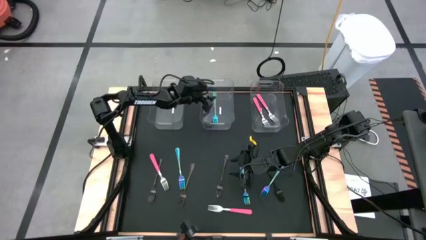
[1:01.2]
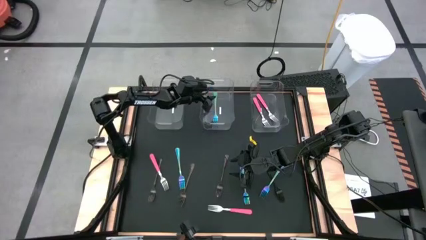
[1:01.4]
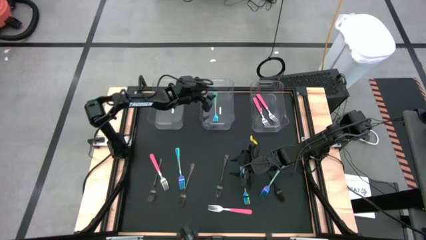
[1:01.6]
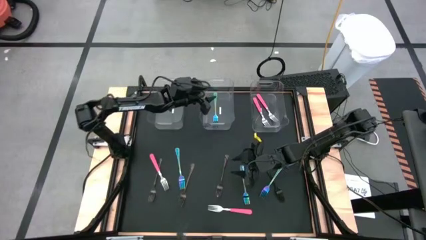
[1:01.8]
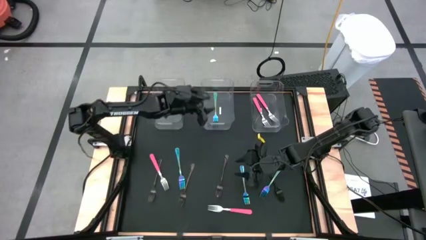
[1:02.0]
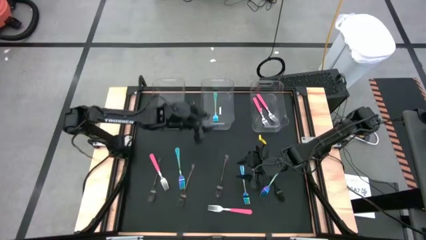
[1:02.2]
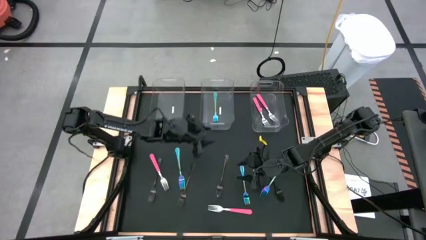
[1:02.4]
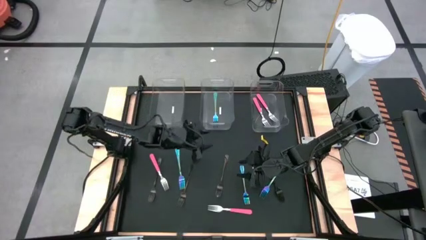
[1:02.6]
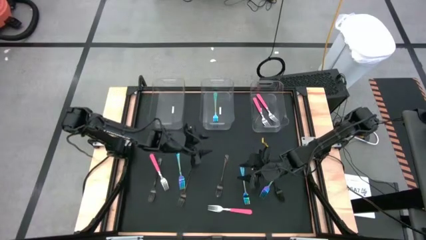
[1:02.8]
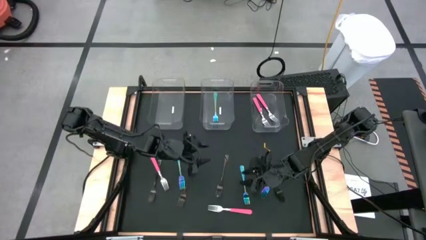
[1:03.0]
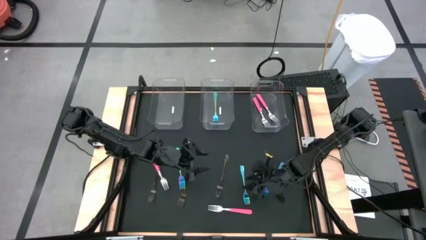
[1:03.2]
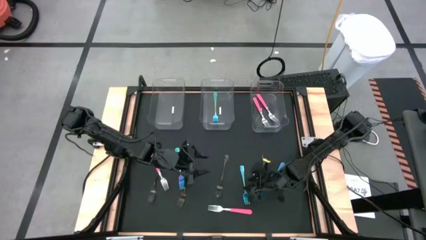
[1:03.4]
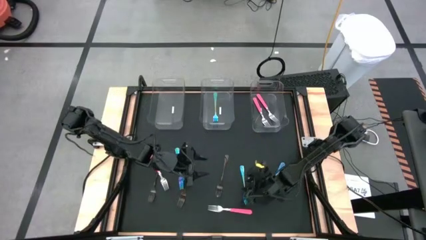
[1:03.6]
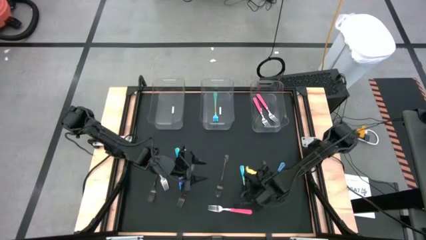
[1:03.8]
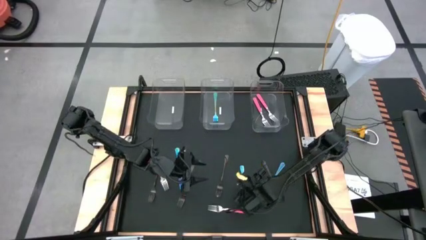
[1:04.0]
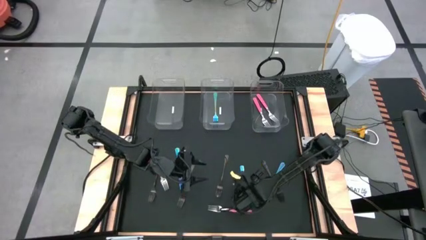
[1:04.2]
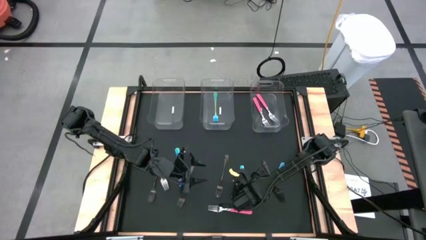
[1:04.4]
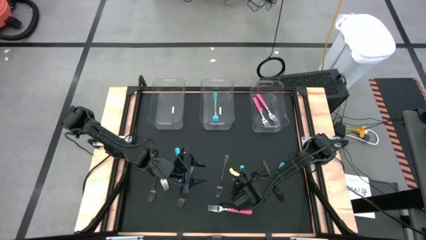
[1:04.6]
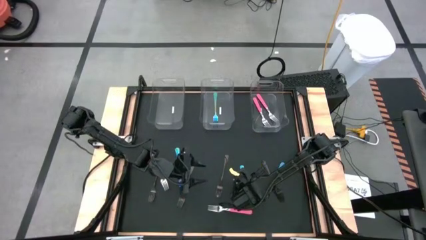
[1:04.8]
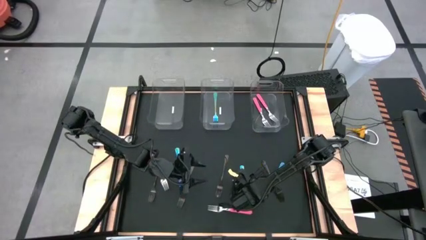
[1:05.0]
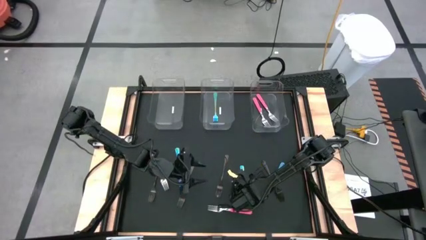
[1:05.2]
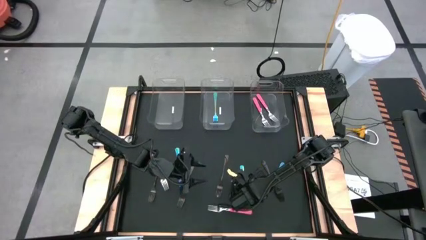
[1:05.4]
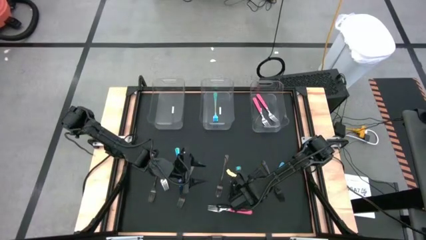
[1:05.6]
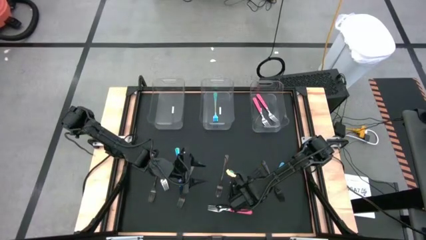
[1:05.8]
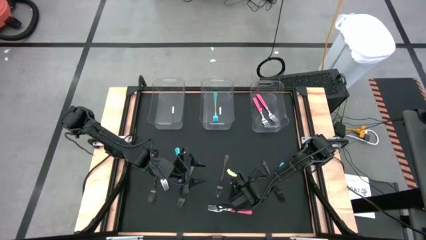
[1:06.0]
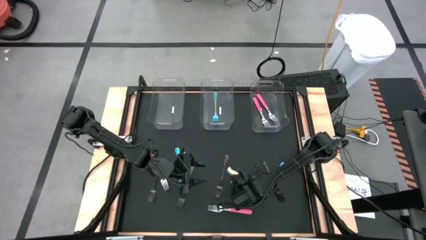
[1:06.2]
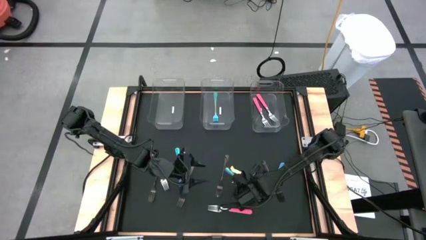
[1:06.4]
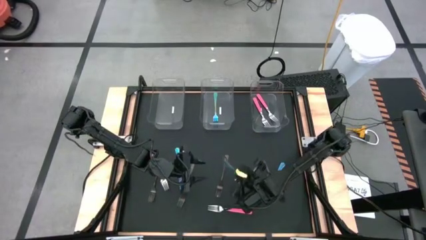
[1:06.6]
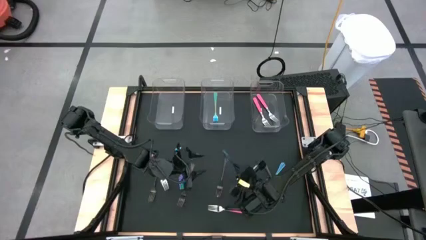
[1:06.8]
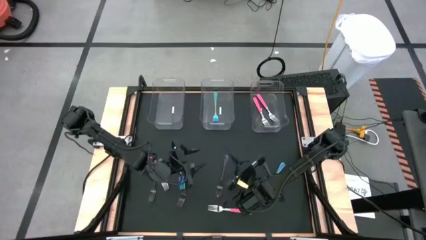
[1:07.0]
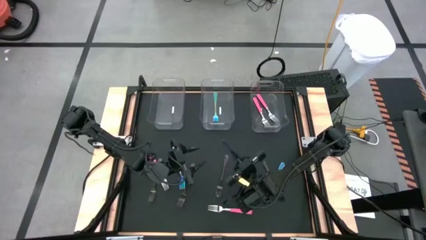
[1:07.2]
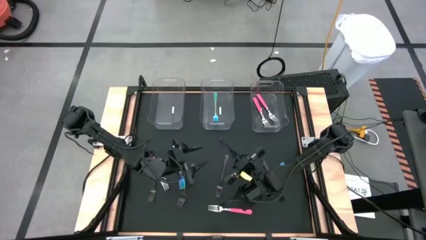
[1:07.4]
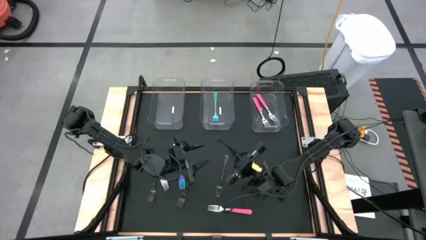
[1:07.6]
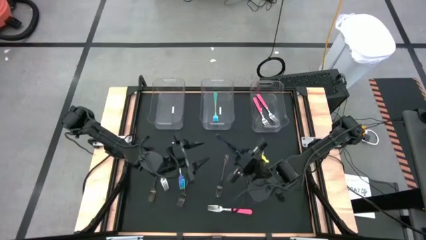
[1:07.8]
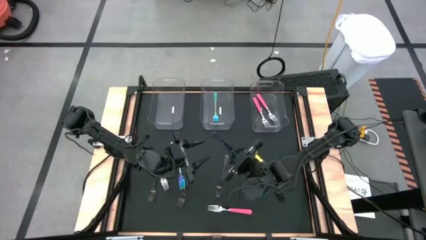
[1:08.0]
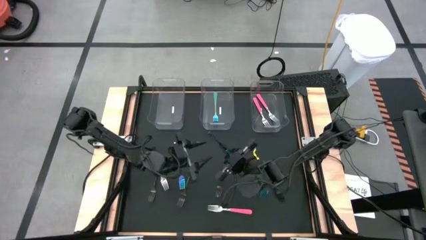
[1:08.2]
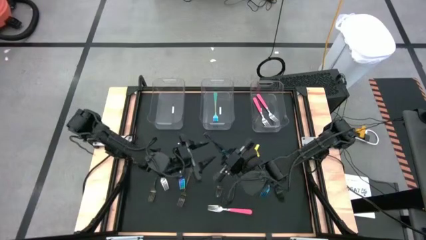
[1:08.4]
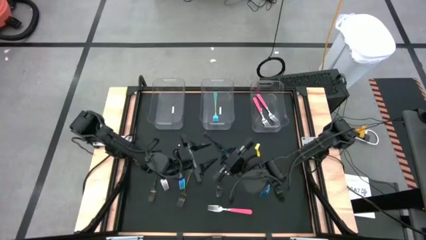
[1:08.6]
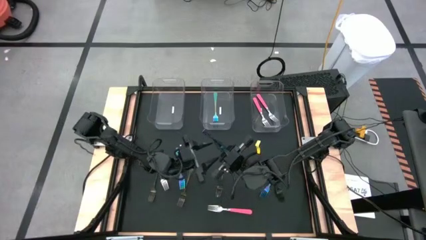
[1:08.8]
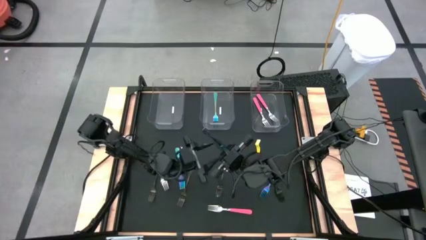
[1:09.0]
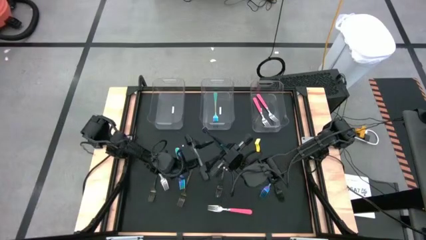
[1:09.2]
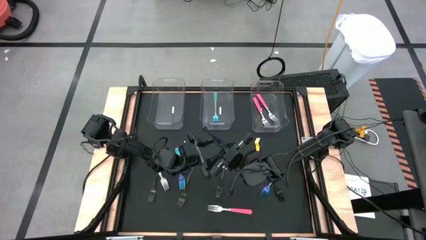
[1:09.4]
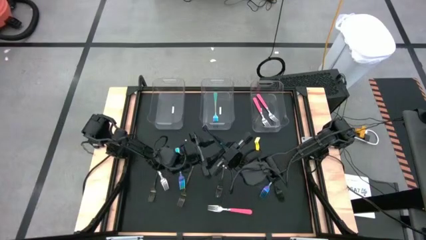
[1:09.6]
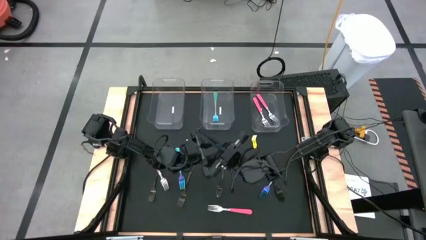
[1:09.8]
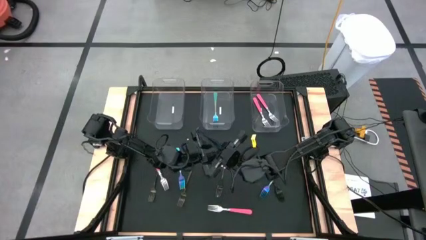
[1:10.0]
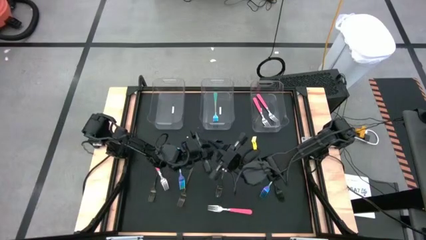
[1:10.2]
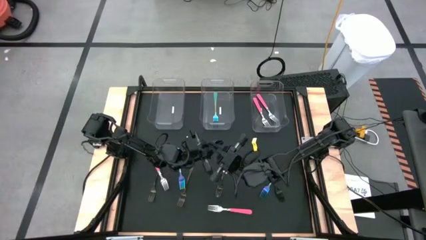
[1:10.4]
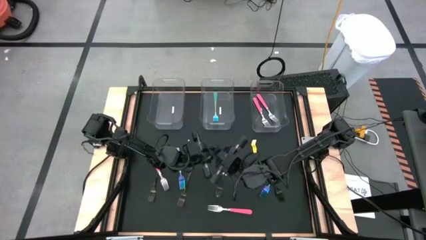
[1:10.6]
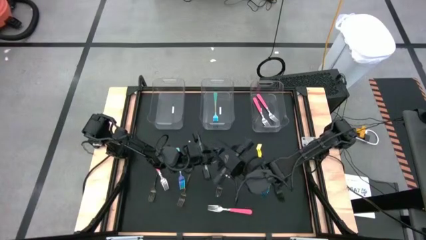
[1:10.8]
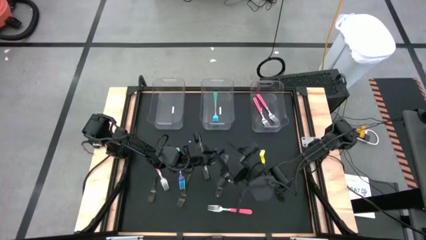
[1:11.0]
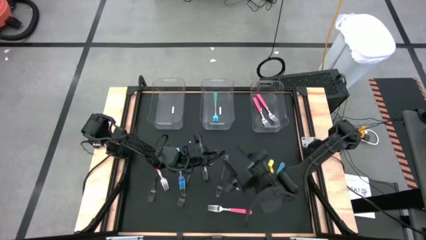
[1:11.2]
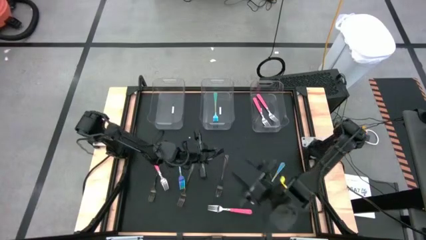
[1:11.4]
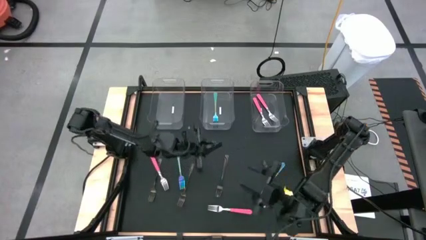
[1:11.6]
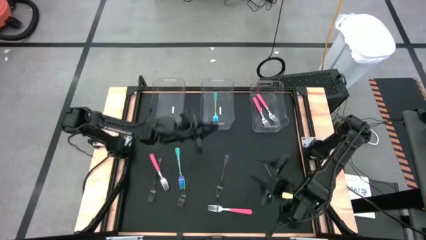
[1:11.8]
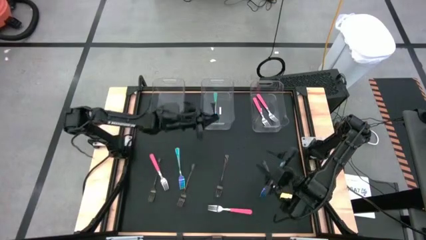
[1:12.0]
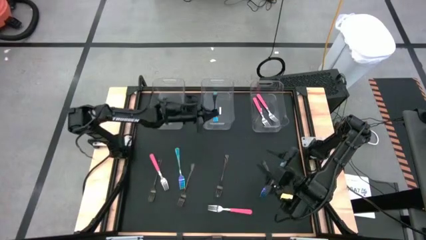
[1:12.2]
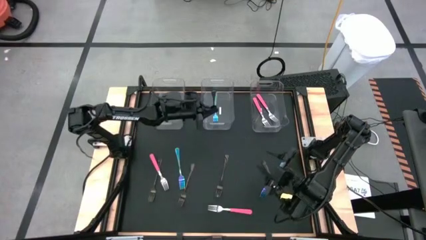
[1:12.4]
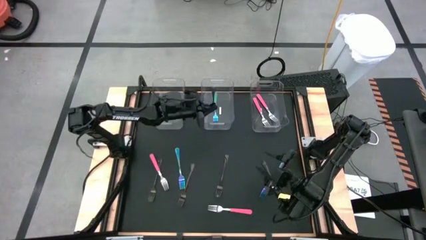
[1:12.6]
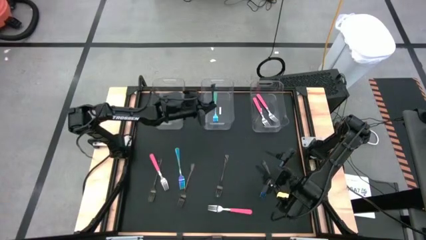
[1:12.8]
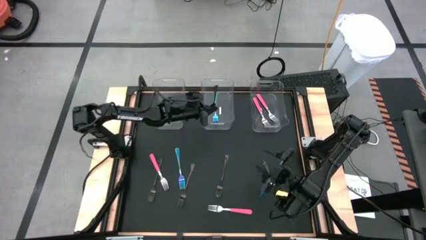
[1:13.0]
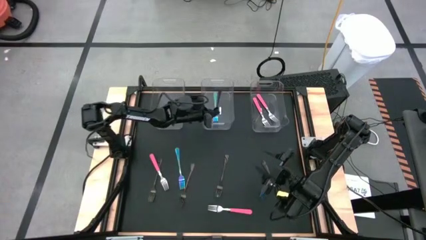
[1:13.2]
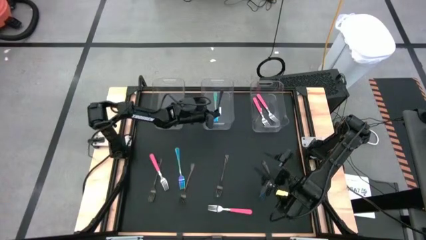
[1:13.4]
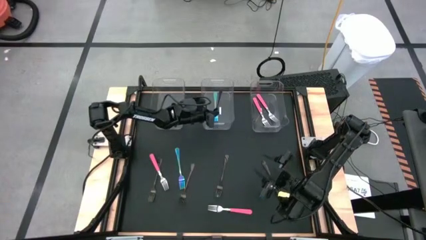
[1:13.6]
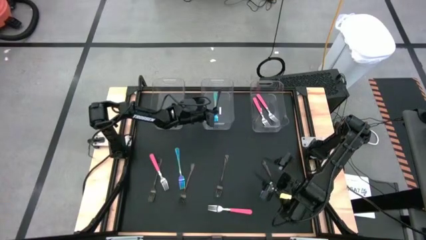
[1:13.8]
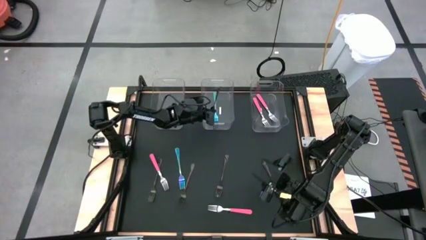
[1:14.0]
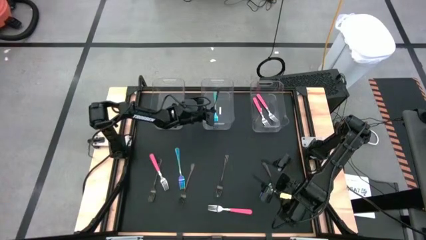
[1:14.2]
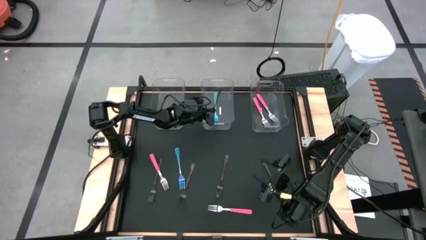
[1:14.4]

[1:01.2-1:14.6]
Task: Sort silverware by color (type)
Put the blue fork into the middle transparent bin

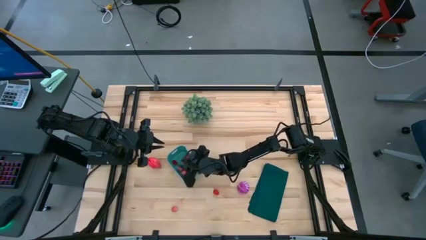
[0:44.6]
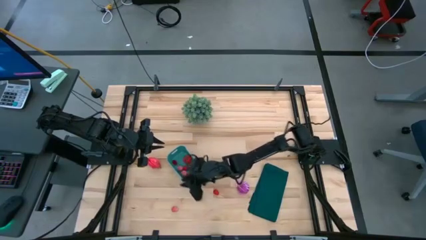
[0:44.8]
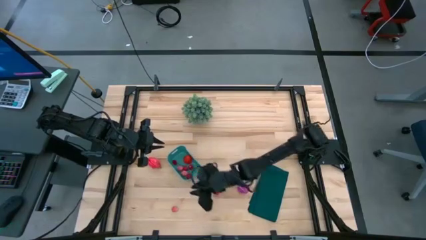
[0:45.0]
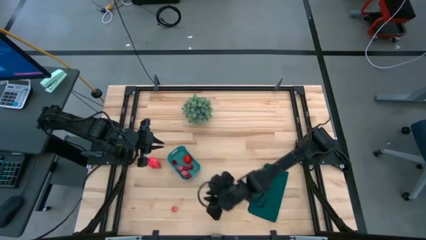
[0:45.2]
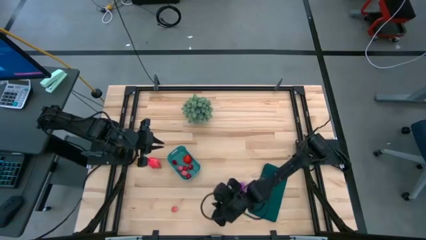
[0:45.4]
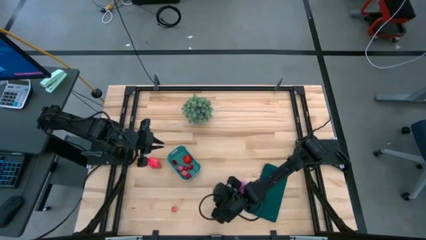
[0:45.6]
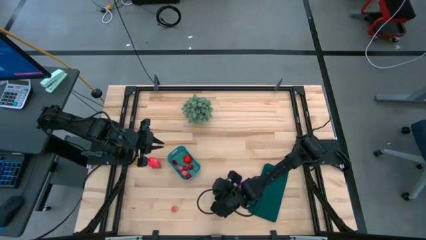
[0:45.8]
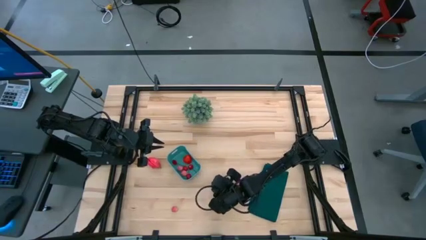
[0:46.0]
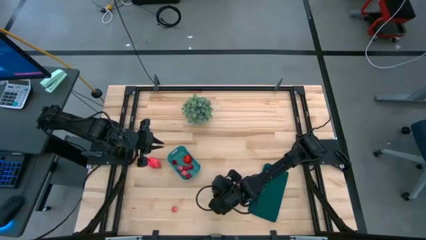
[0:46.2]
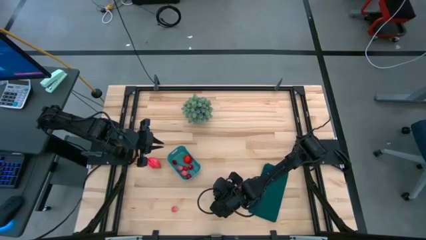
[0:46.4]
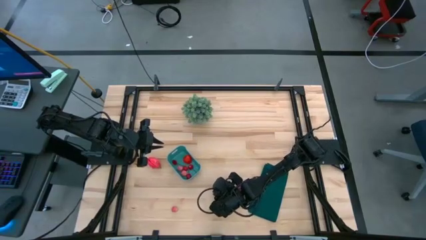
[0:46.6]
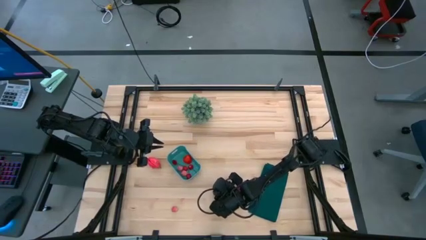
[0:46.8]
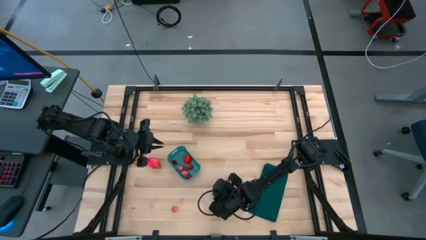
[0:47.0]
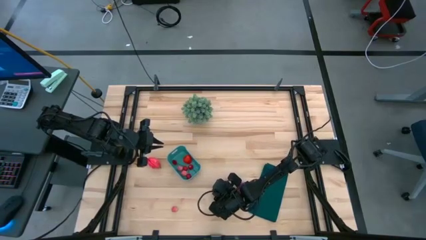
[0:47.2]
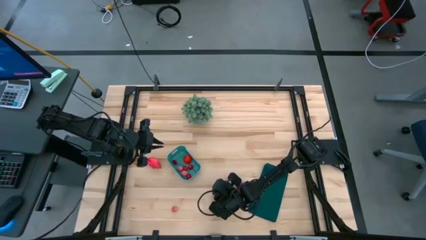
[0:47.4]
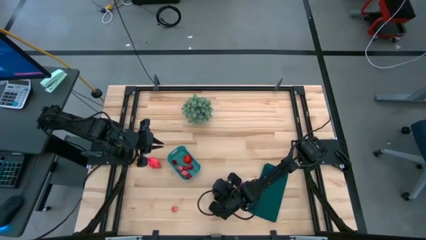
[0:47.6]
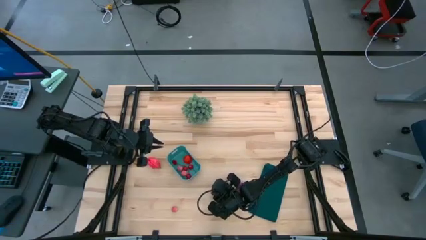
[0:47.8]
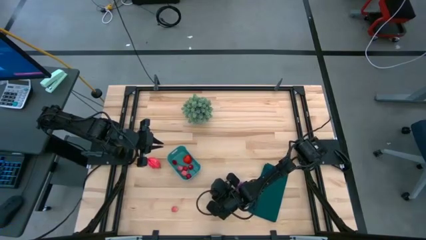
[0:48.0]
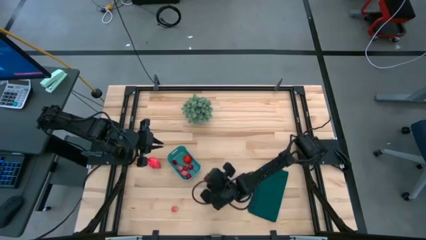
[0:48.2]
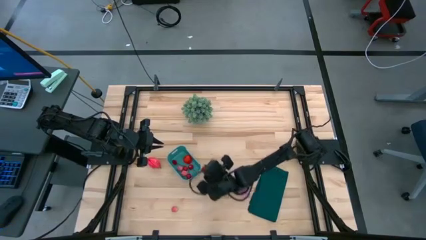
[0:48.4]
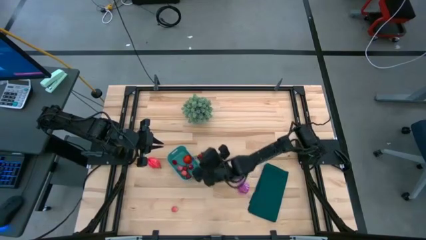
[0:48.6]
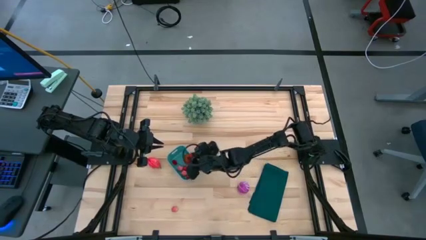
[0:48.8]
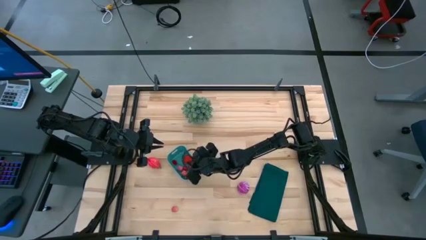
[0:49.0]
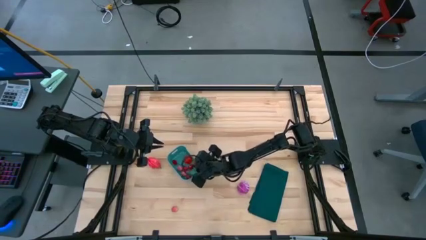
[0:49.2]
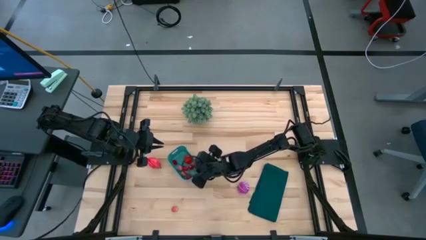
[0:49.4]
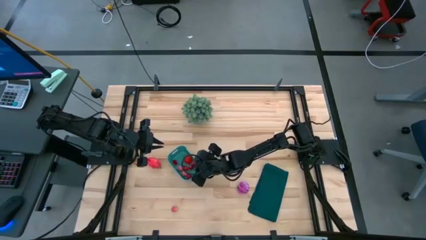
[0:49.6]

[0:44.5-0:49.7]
Task: Pick and placing Produce into tupperware
Put the red raspberry into the green bin
